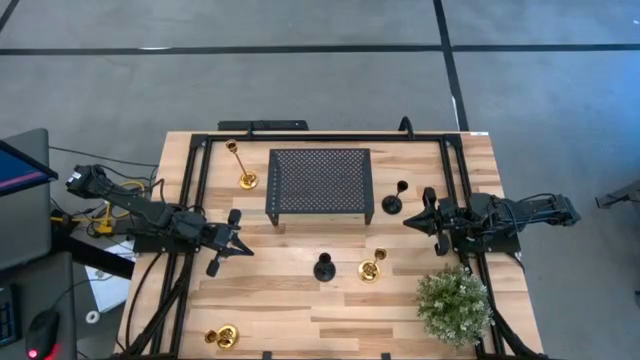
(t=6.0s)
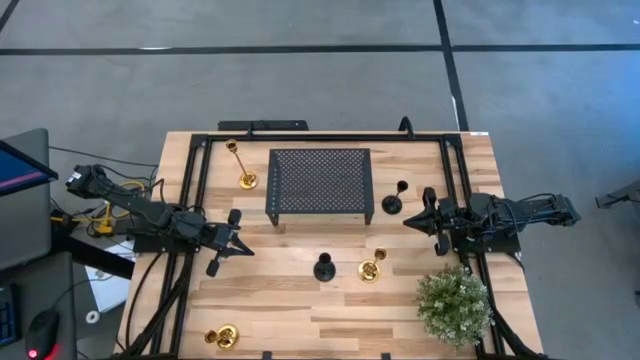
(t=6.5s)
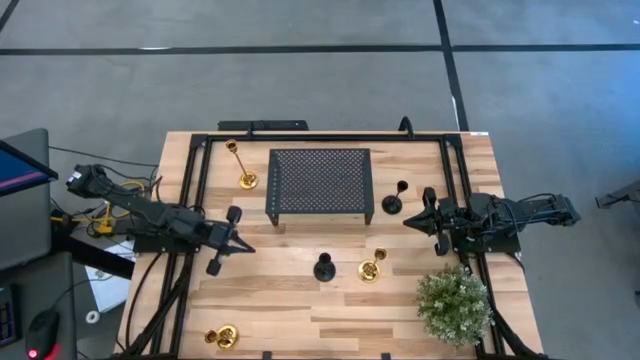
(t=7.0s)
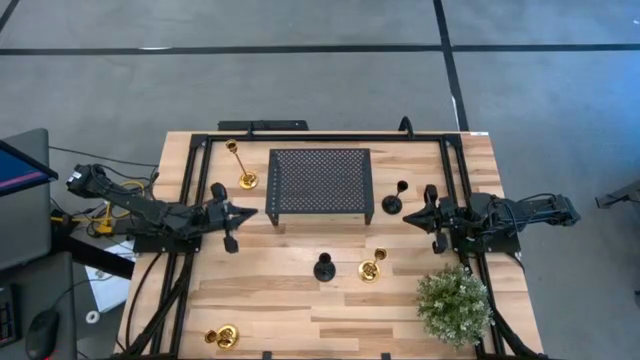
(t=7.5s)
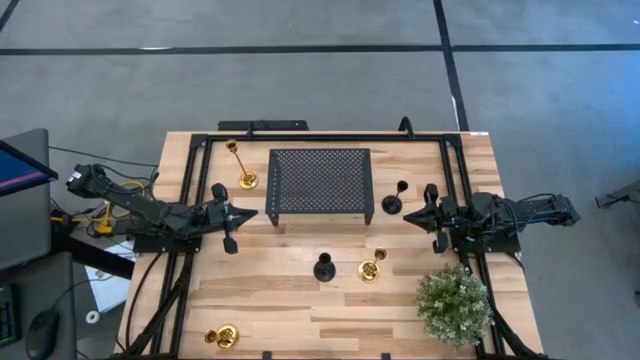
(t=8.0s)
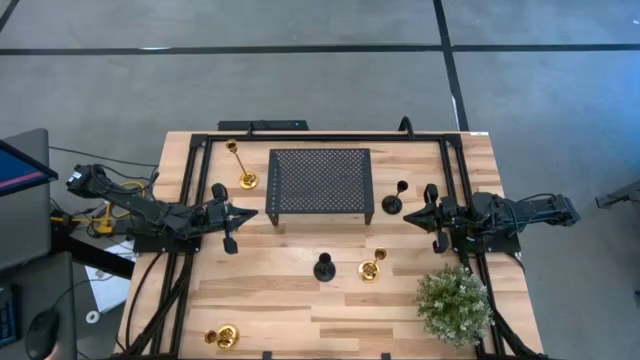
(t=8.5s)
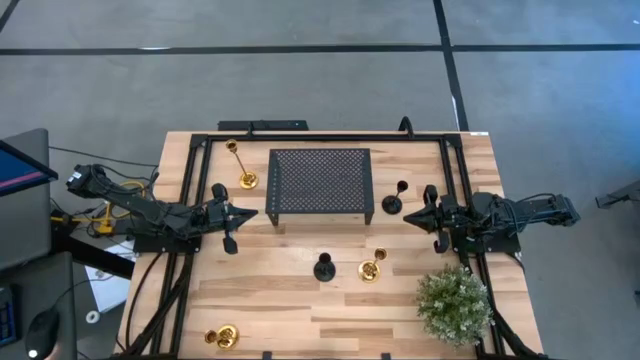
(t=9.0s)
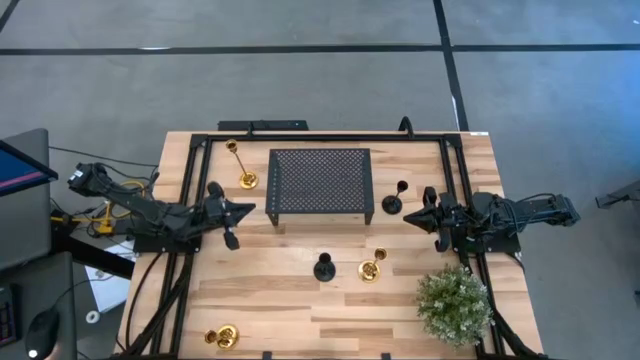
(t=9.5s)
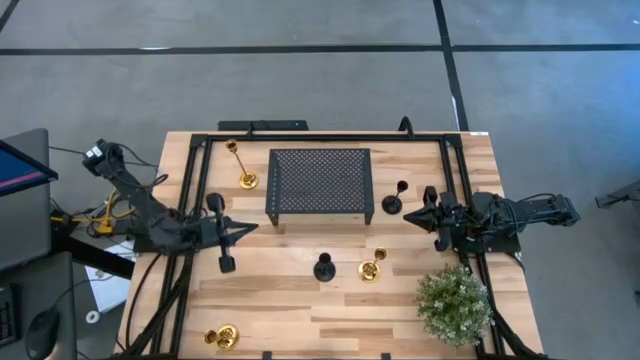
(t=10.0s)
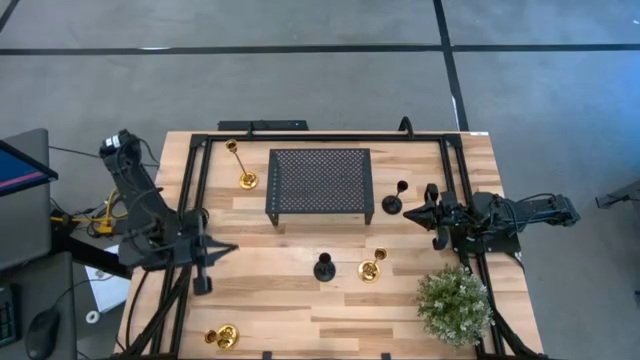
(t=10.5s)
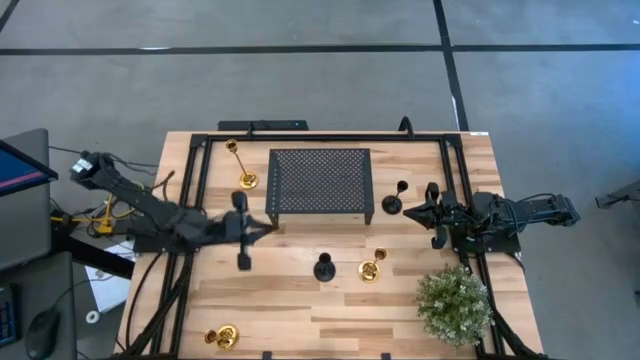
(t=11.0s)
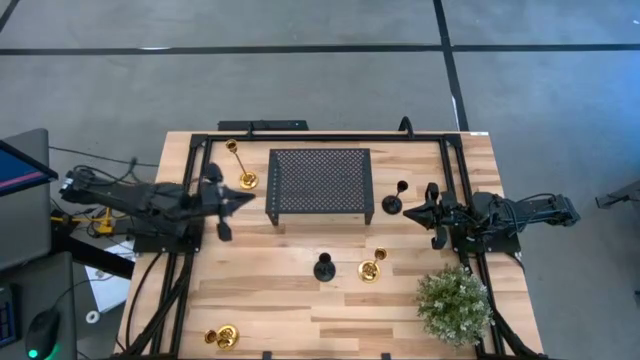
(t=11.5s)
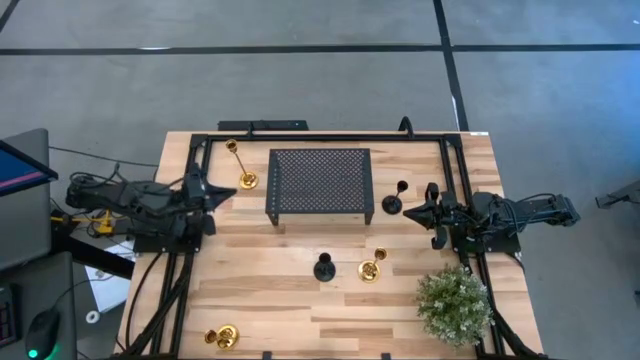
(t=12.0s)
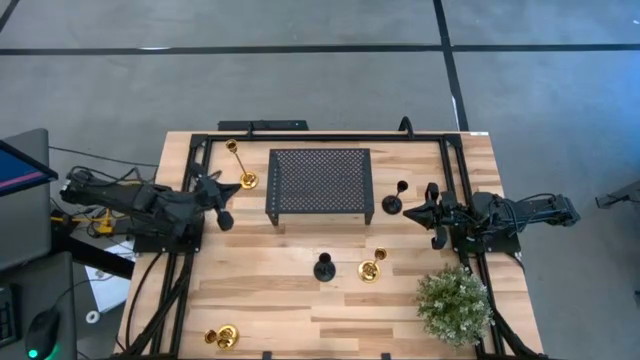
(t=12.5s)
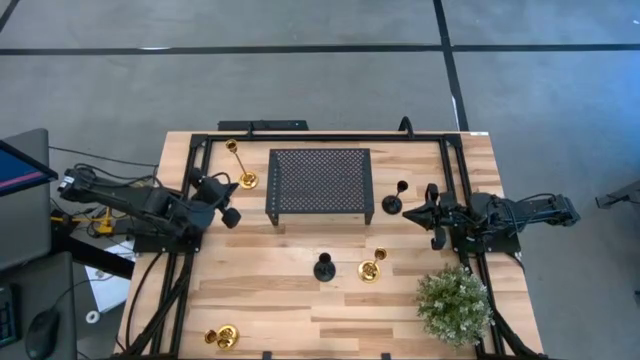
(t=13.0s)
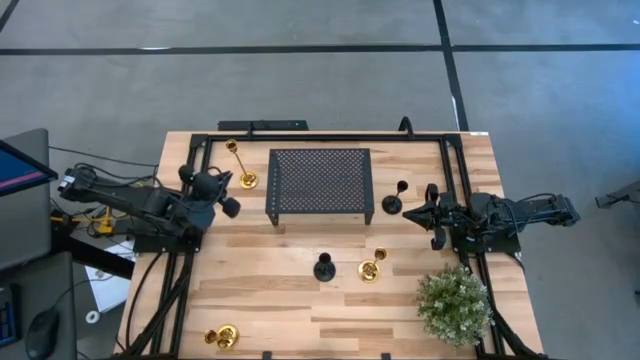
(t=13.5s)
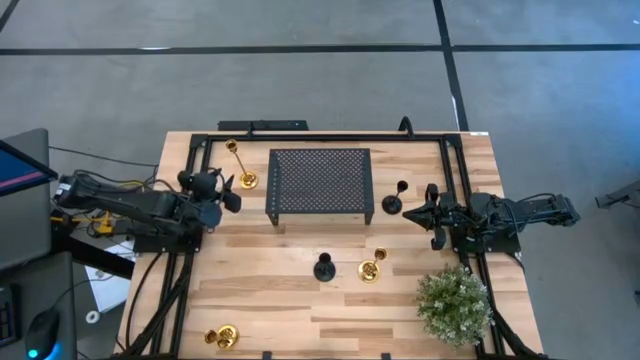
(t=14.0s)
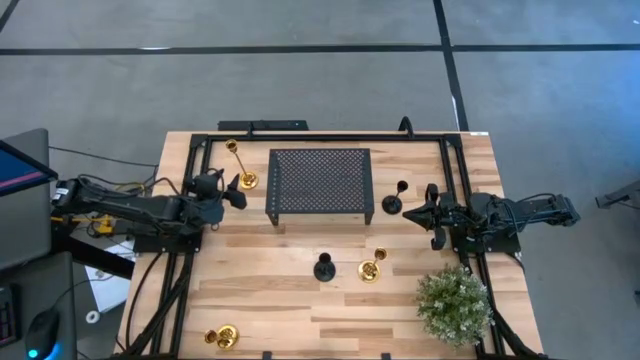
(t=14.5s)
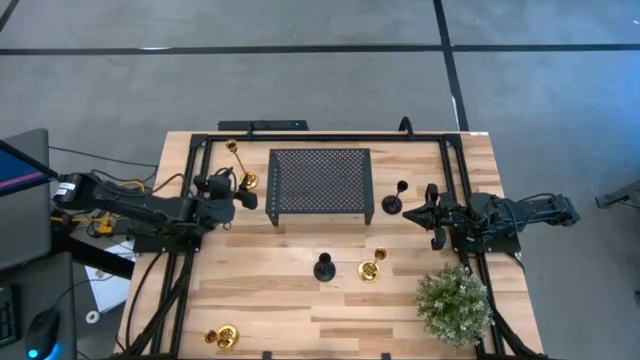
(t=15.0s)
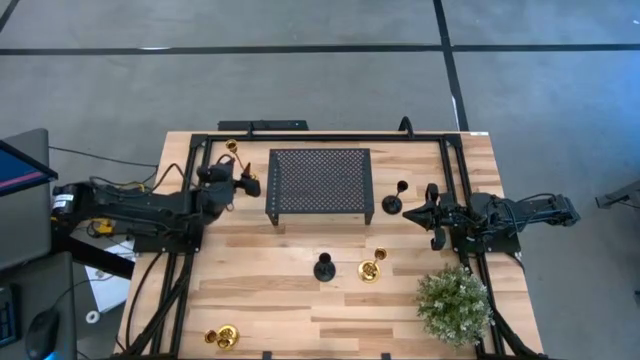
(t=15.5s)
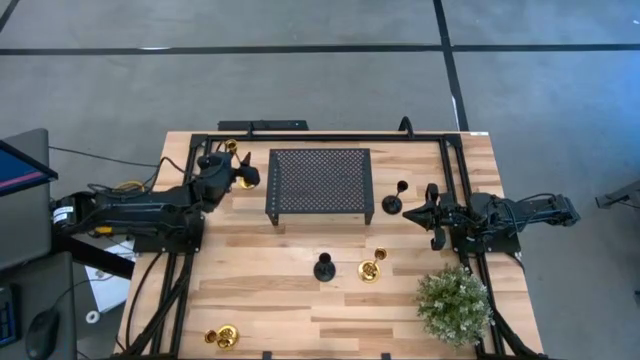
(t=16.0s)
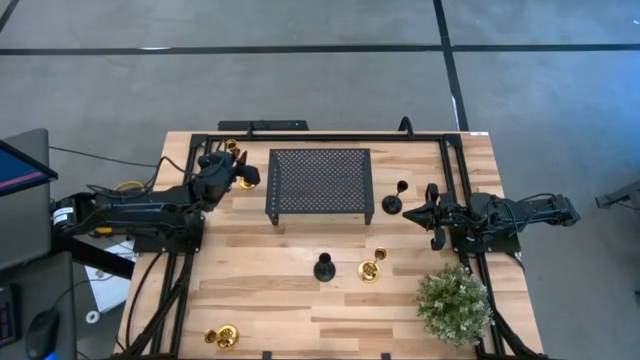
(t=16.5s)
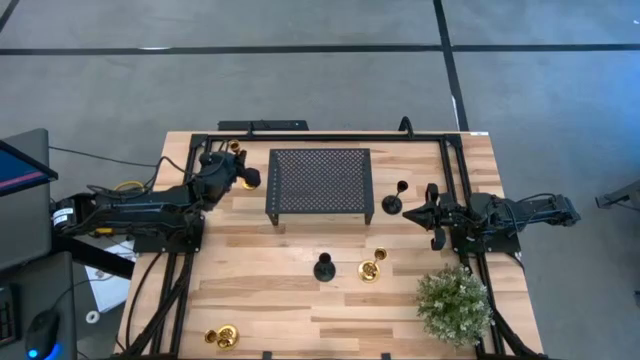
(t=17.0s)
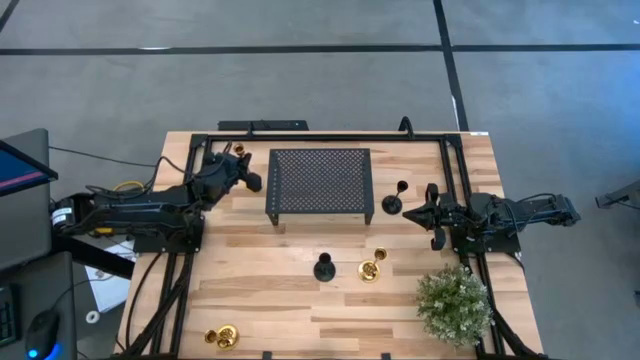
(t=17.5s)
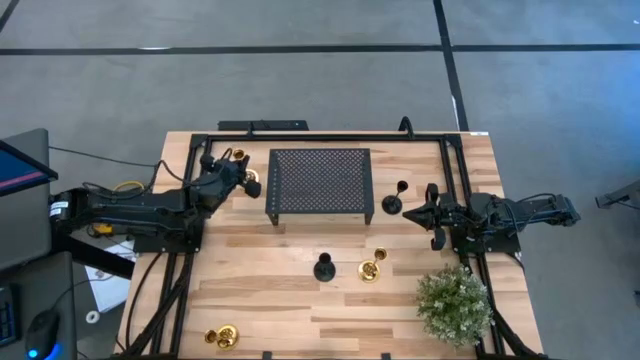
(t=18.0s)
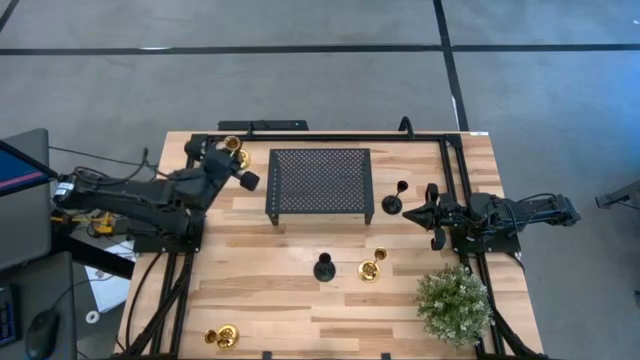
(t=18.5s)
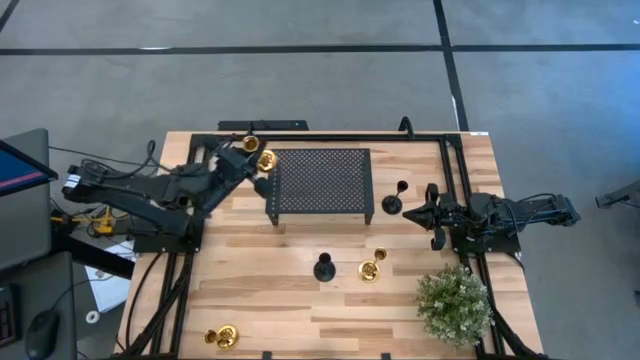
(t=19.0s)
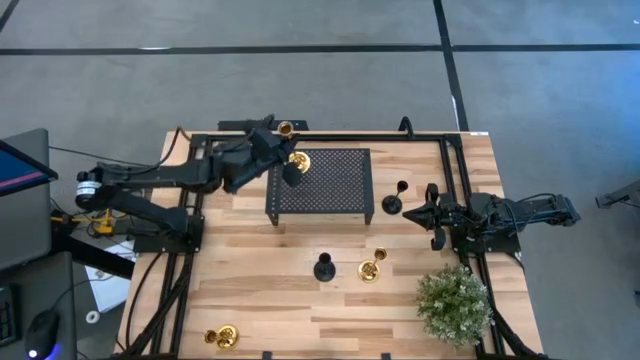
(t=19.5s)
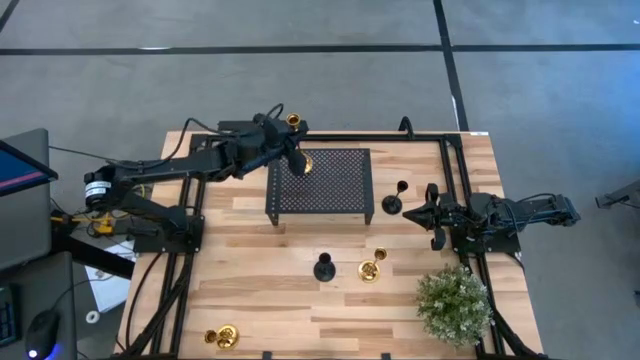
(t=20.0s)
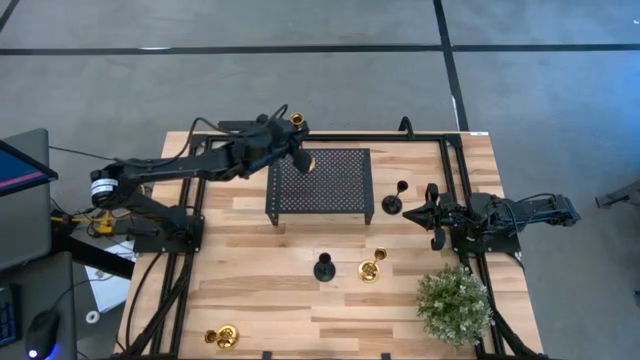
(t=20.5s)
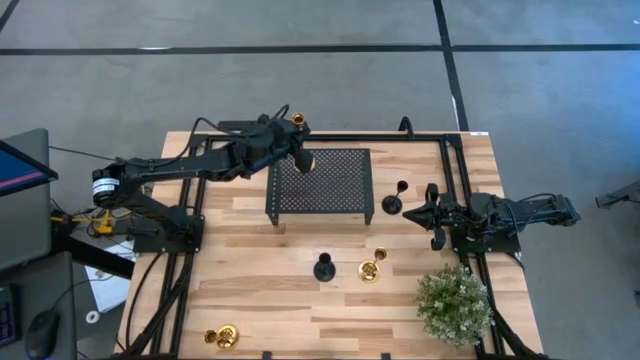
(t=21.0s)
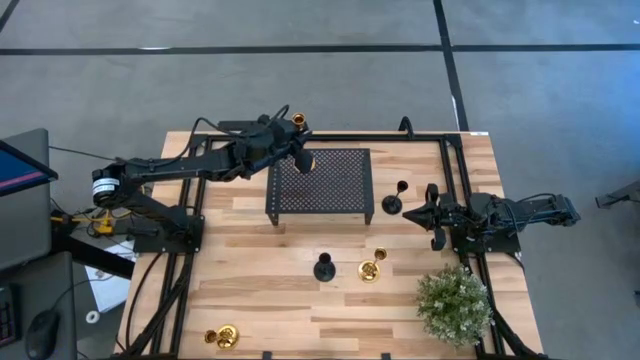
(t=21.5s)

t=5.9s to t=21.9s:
Task: Pick & Place candle stick holders
Put the top left gold candle holder on the shelf

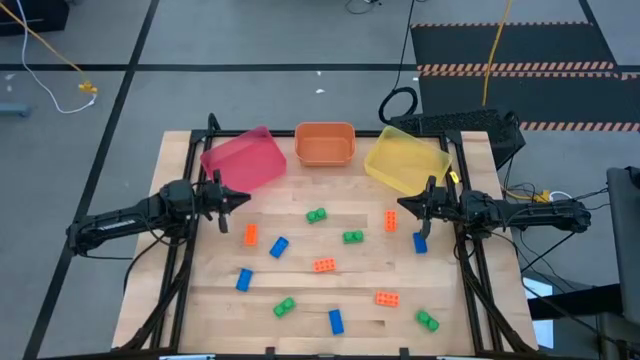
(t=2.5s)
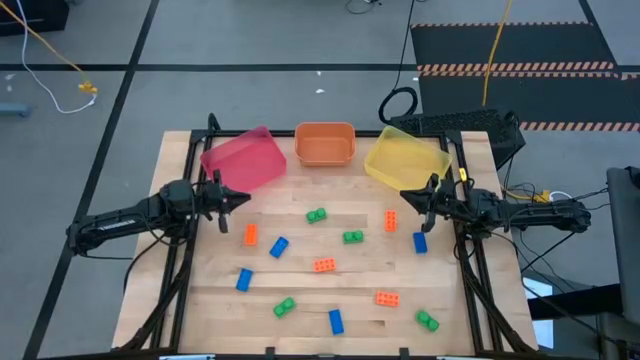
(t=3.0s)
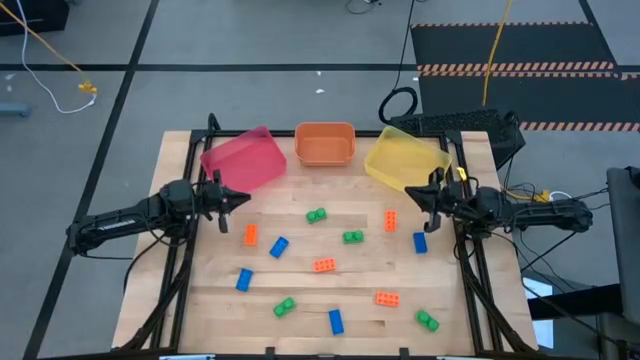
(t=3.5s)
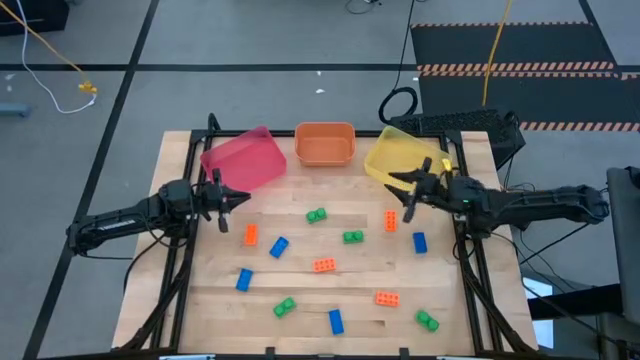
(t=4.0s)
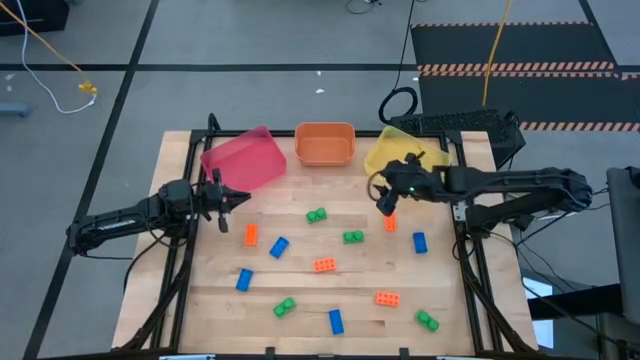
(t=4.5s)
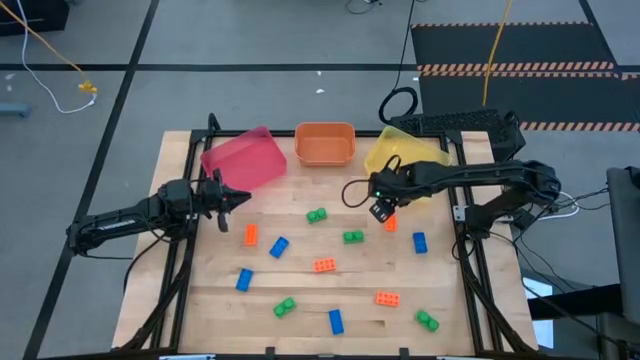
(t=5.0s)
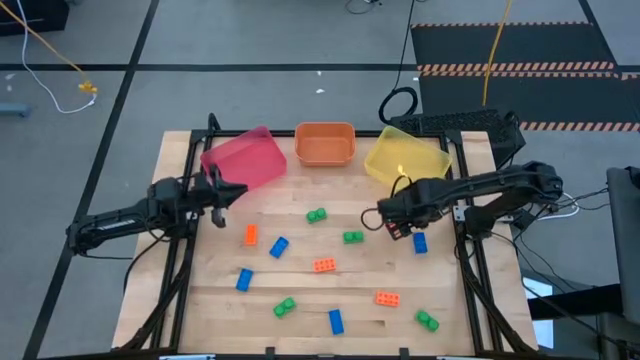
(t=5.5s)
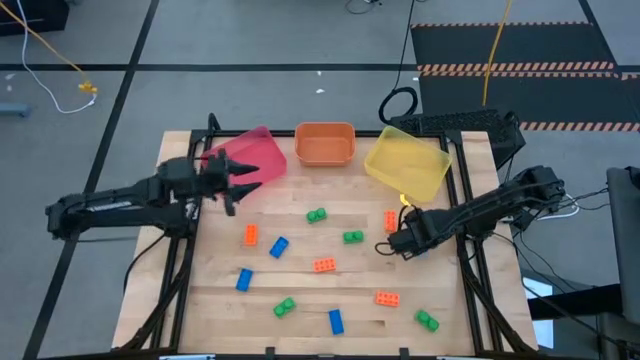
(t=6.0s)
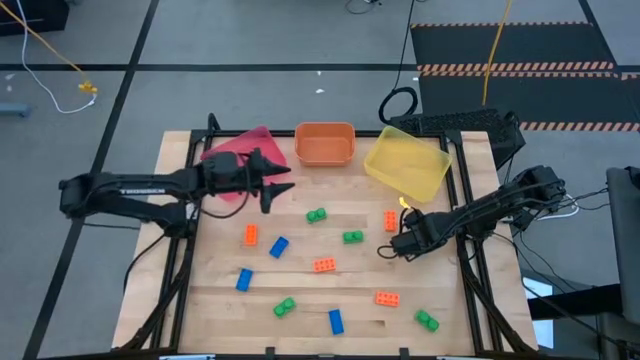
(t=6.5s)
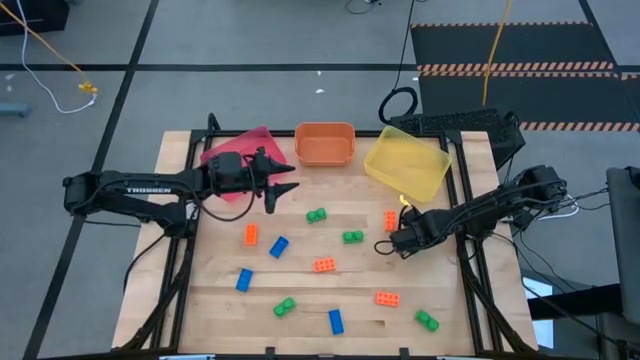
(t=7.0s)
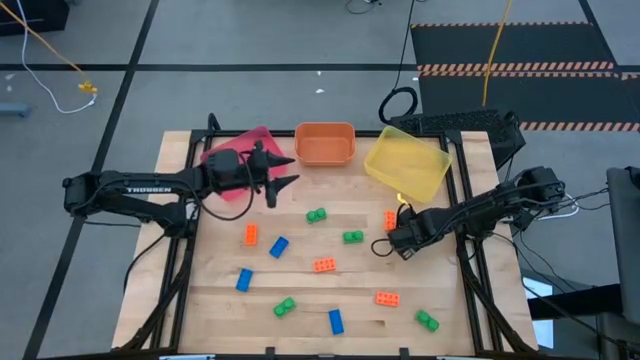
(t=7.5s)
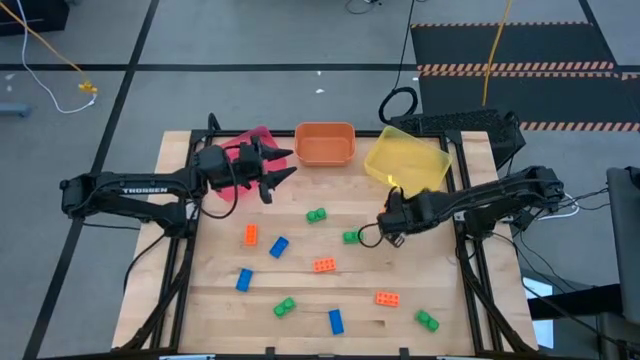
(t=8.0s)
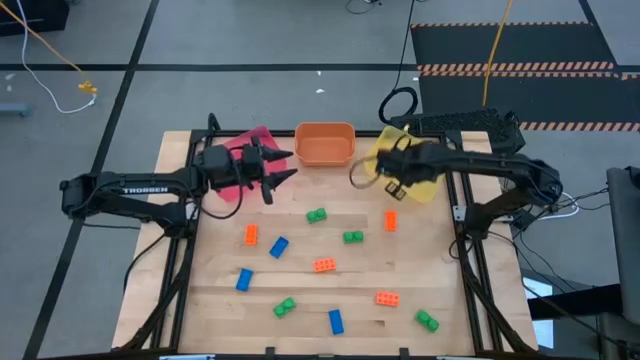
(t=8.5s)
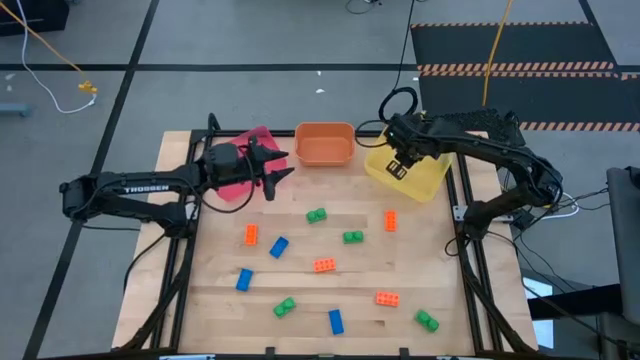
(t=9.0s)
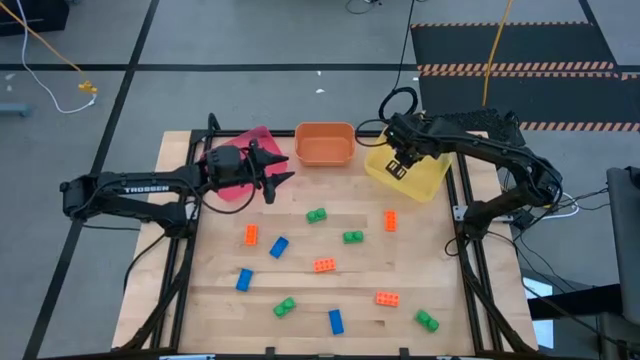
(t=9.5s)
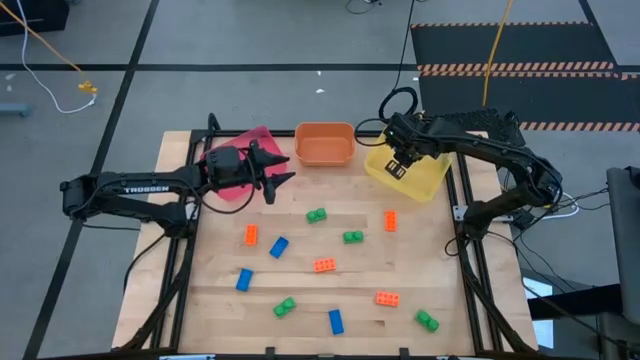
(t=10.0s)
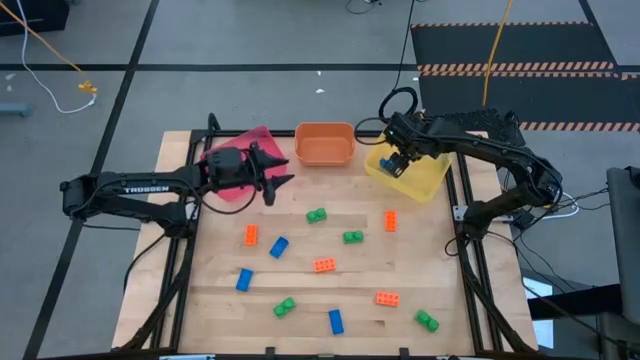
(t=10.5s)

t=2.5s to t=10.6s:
Task: Sort & place blocks by color
Put the blue game piece into the yellow bin
